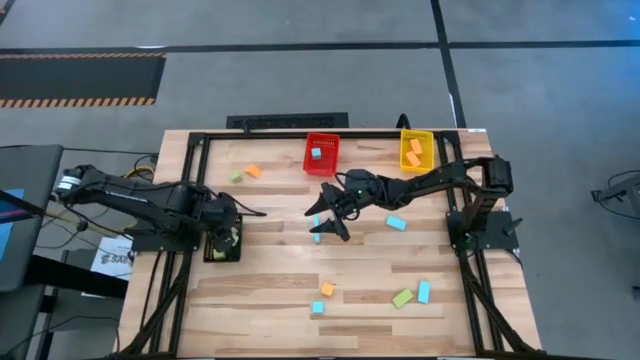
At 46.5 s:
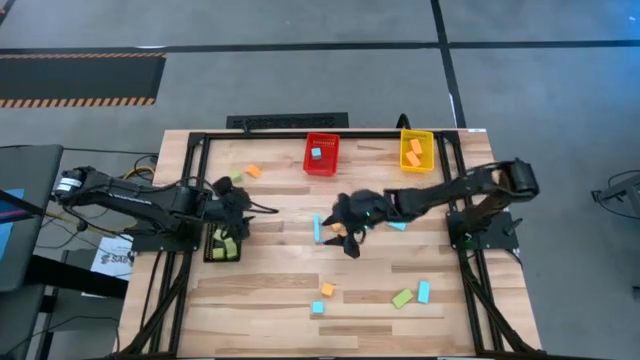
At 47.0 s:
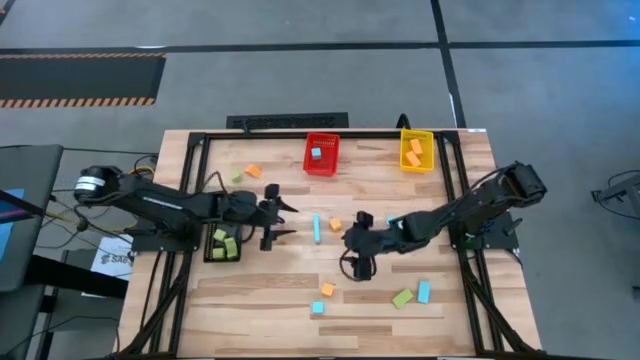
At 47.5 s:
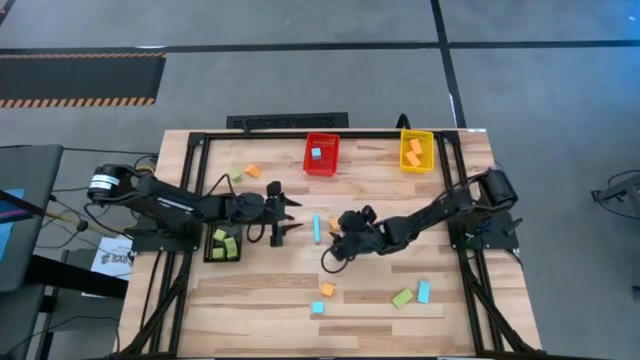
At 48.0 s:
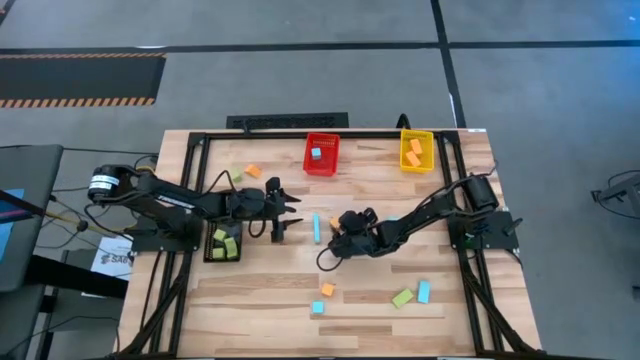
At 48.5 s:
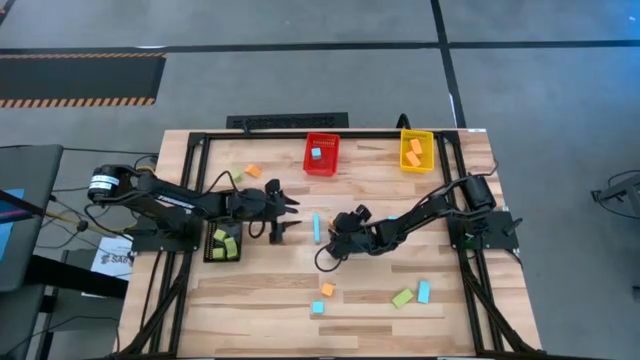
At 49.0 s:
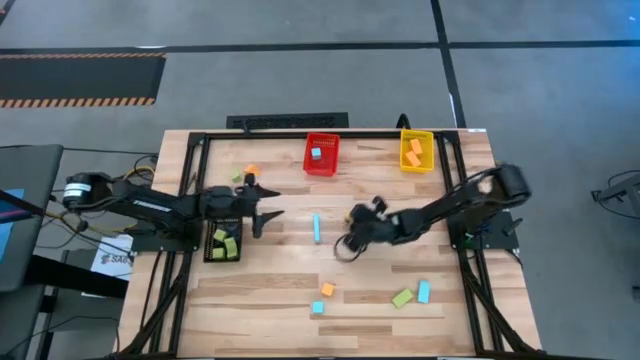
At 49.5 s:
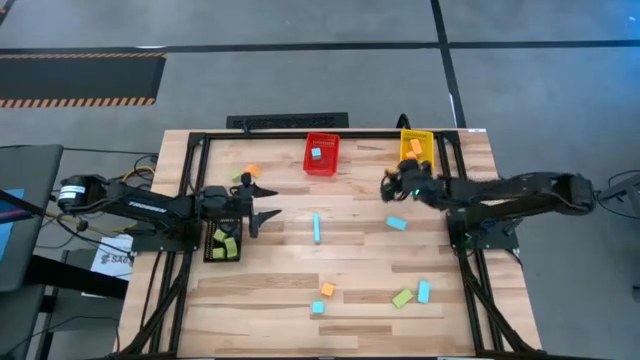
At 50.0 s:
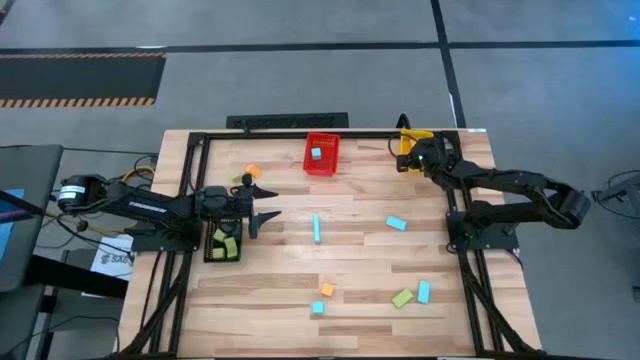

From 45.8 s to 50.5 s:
Task: Sort & place blocks by color
Put the orange block into the yellow bin

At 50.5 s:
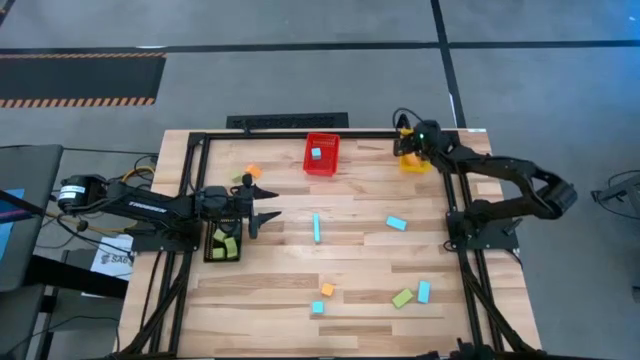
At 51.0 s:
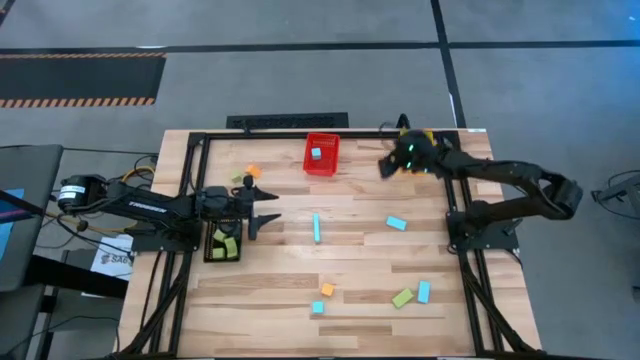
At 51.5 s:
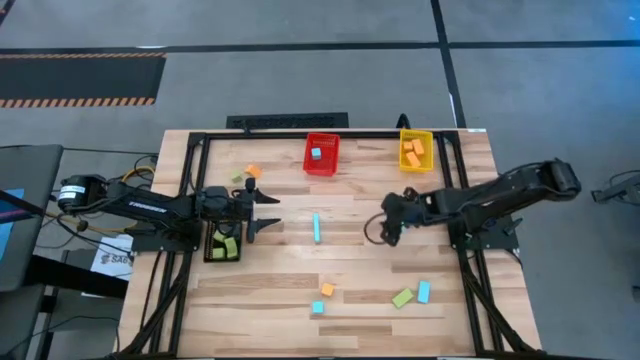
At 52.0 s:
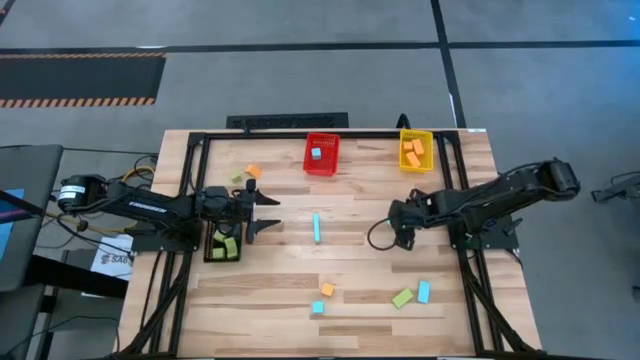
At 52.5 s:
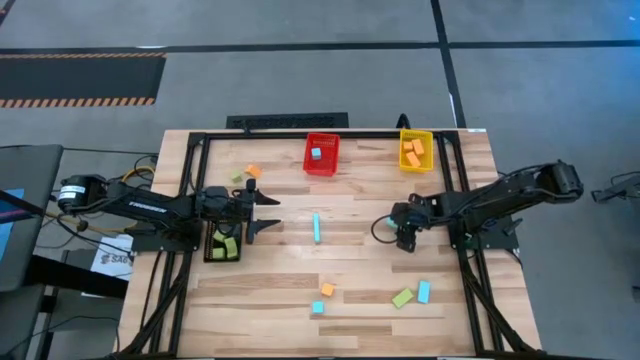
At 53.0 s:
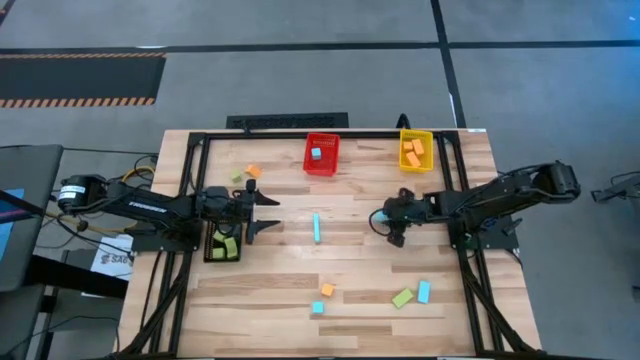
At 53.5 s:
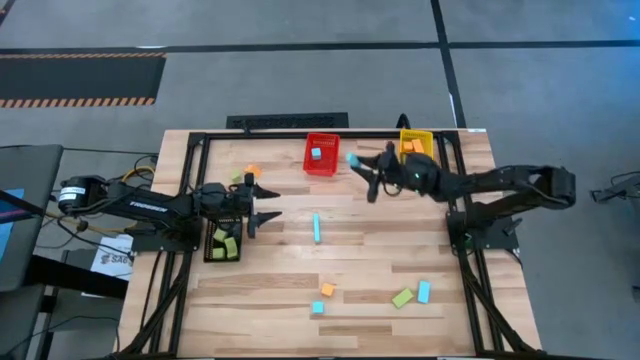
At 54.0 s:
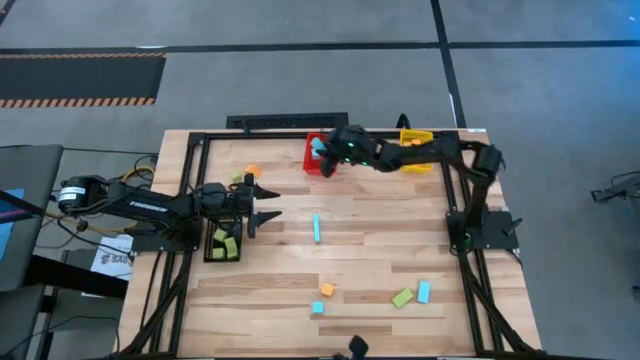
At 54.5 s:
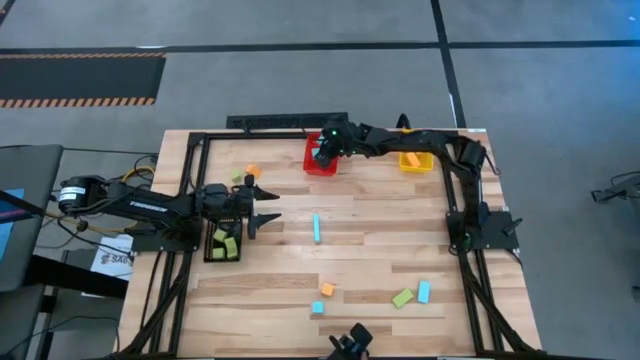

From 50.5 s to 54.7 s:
Put the blue block into the red bin

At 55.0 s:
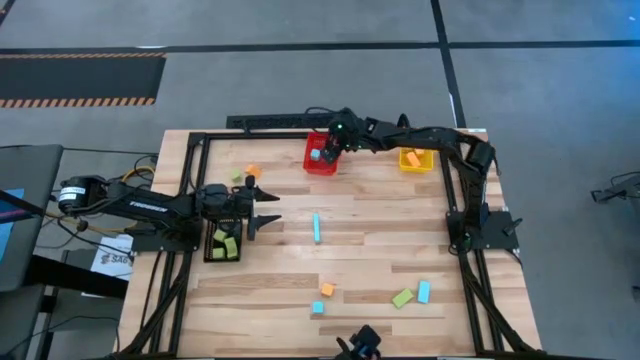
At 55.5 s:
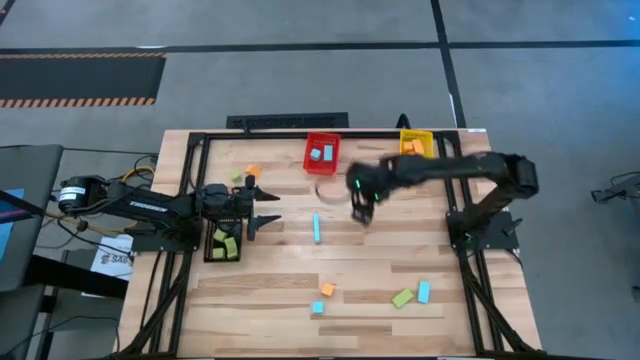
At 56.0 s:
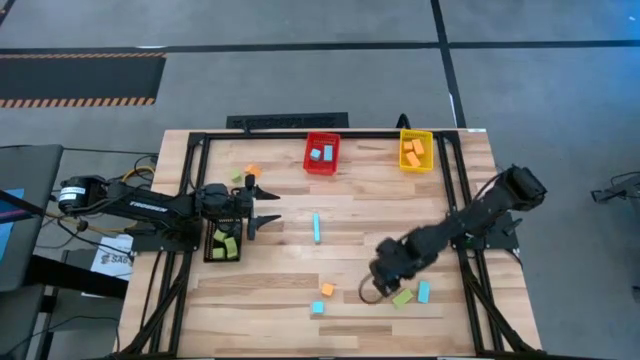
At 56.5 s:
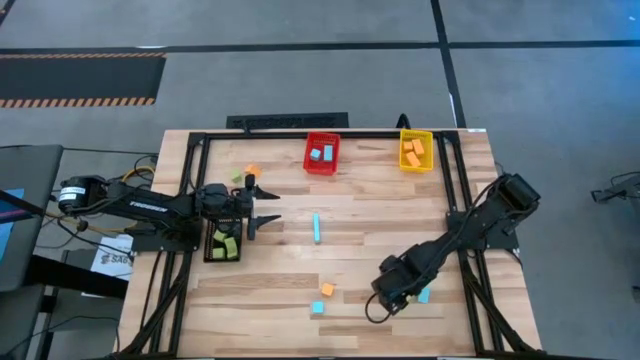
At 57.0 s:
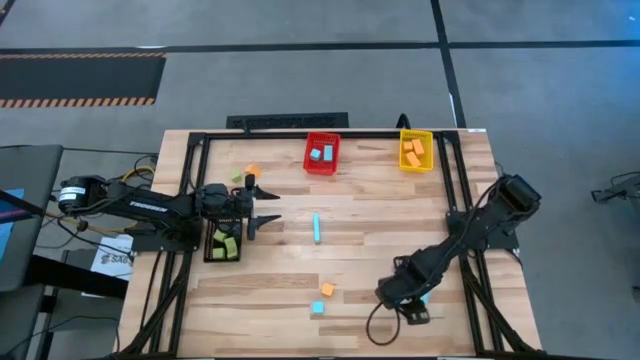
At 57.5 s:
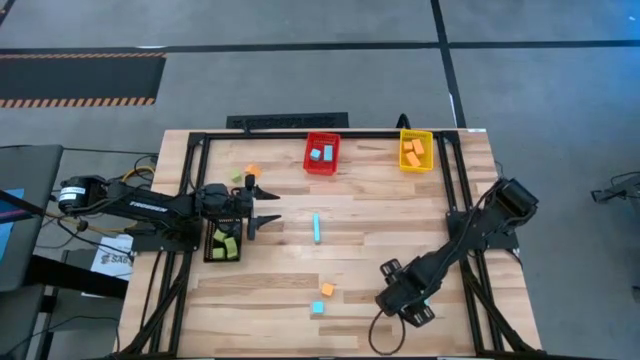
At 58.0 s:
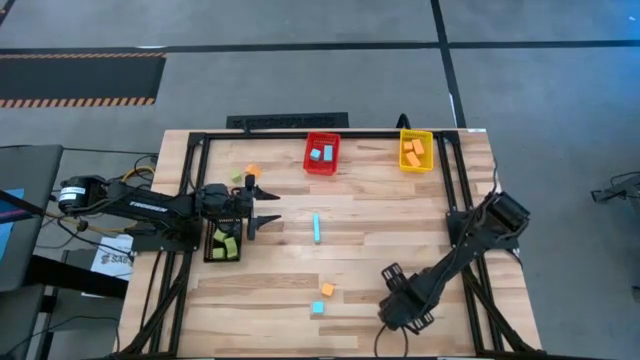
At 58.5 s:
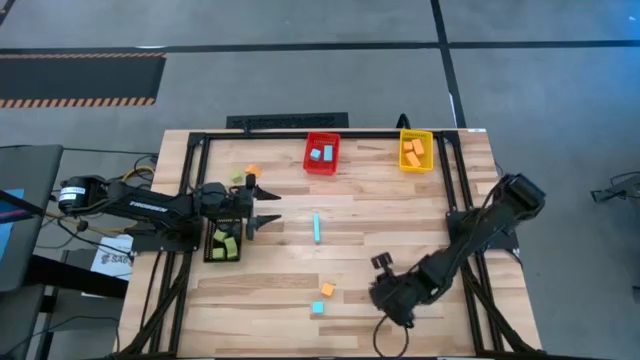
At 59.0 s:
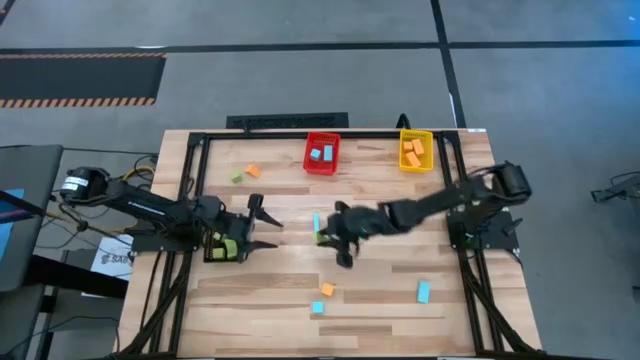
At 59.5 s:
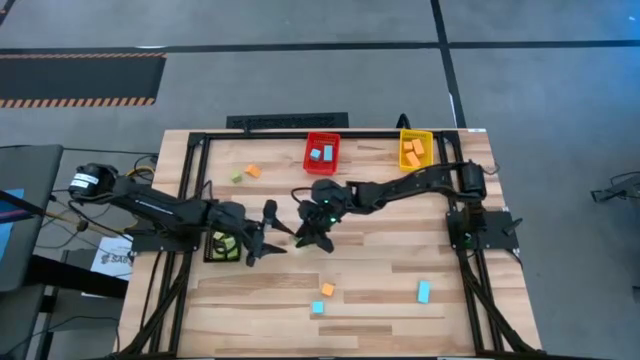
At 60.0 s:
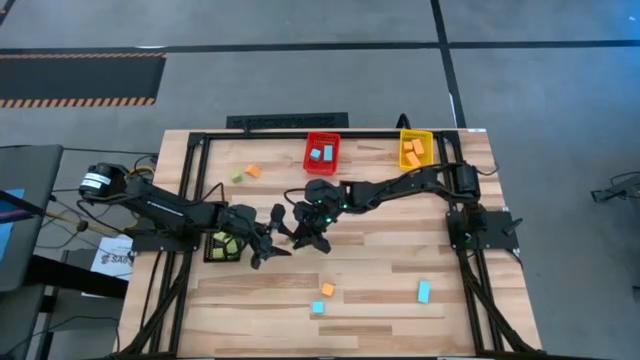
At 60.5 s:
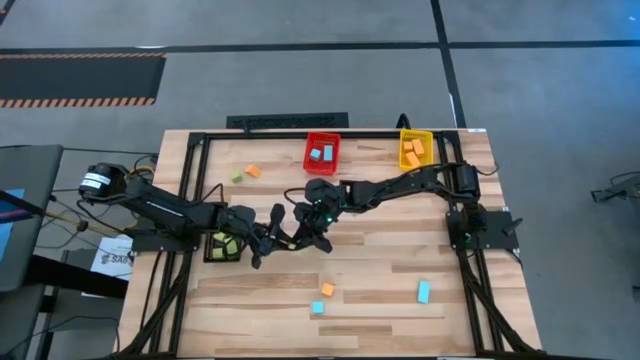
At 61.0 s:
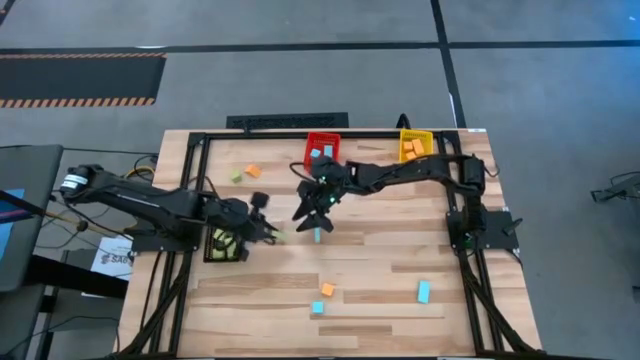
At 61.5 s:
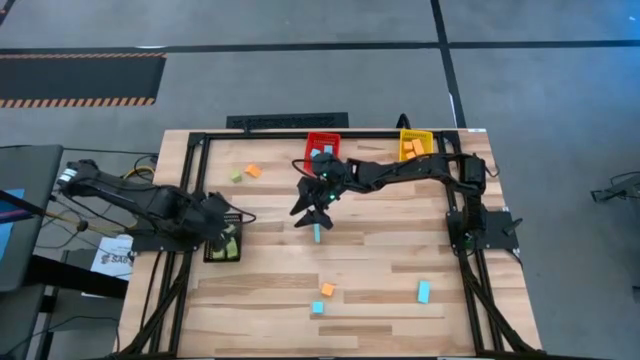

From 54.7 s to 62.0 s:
Put the green block into the black bin

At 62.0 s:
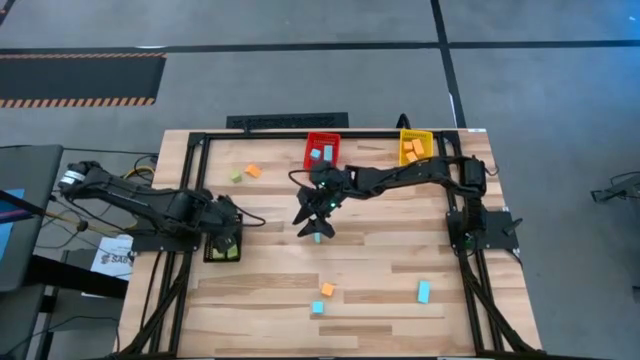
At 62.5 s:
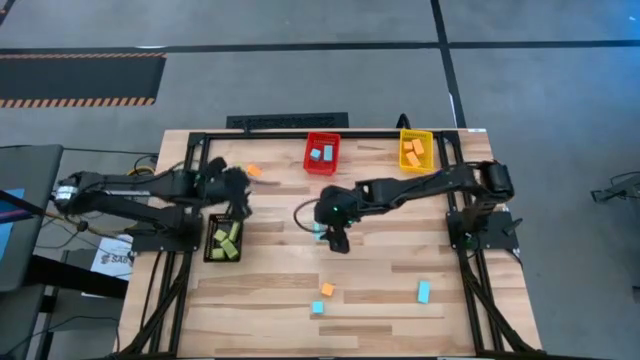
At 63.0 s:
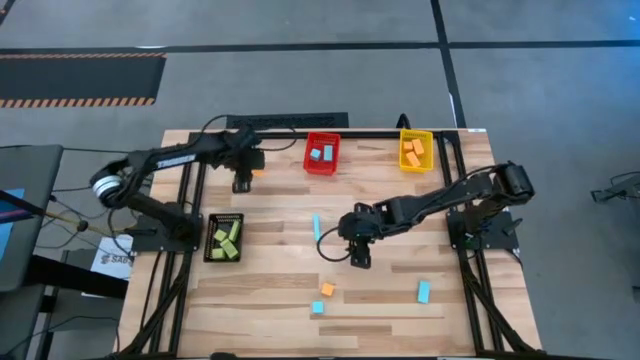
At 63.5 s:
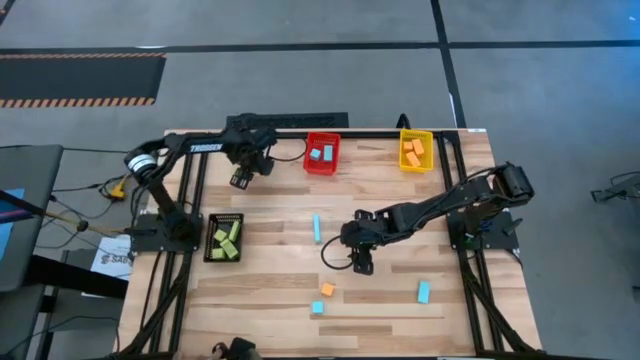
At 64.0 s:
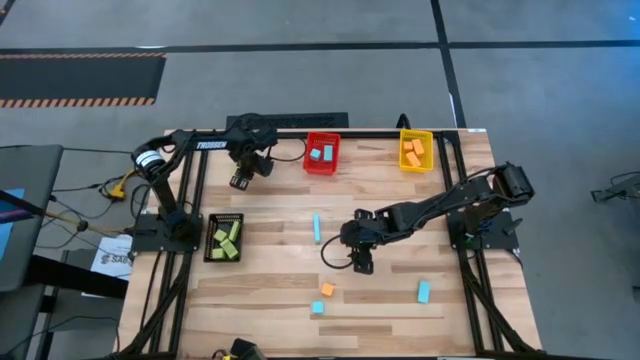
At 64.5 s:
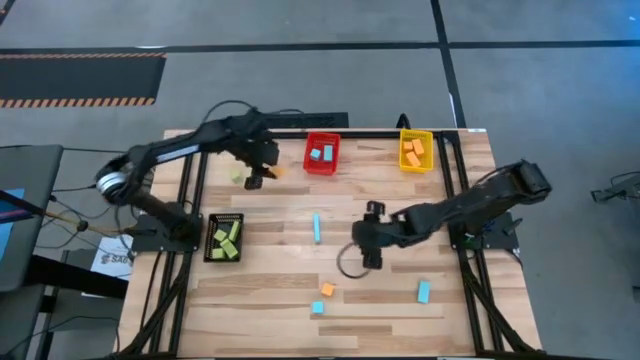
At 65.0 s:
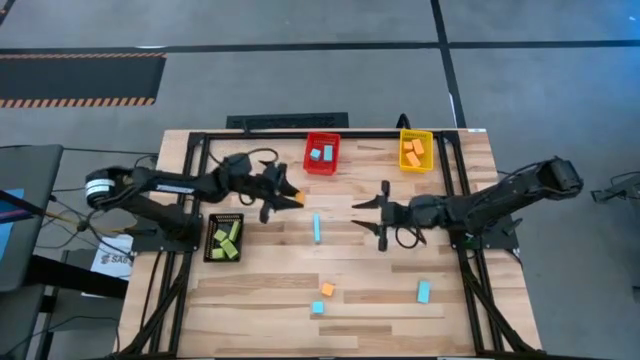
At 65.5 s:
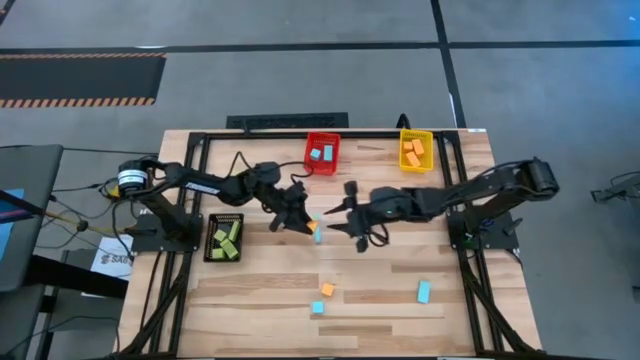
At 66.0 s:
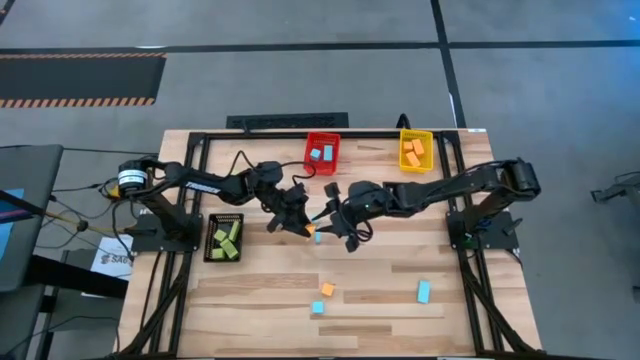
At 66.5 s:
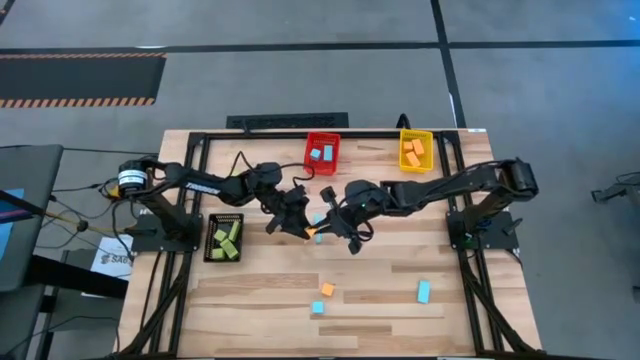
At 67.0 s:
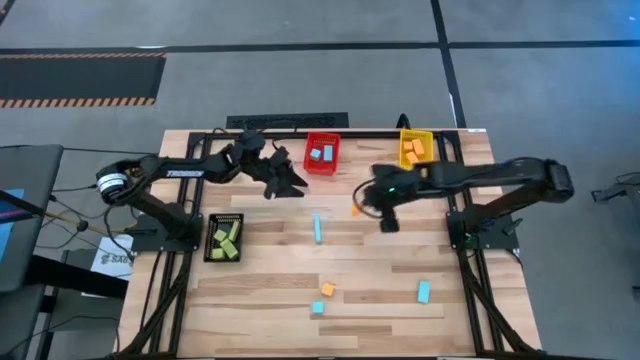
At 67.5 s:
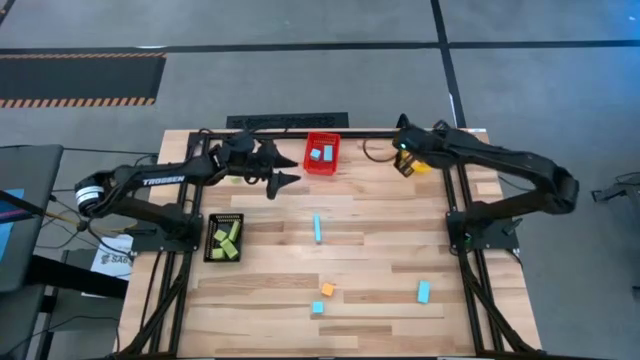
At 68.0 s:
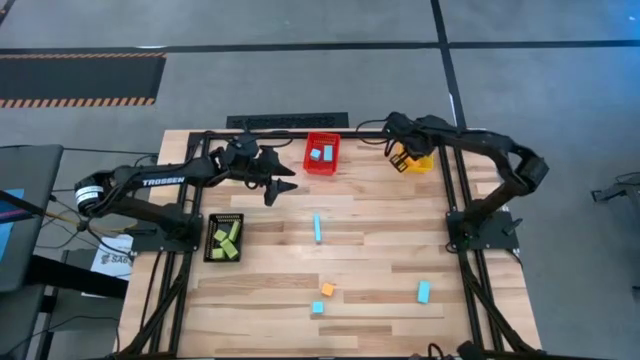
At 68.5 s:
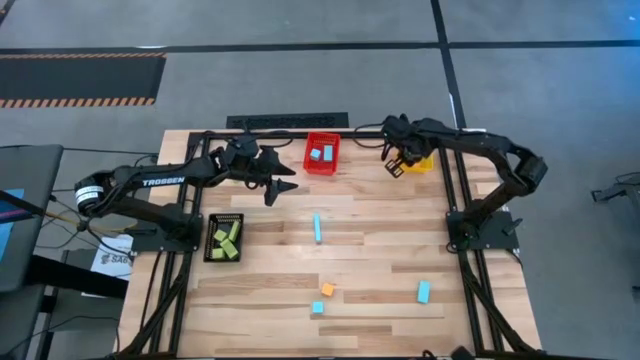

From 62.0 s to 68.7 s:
Put the orange block into the yellow bin
